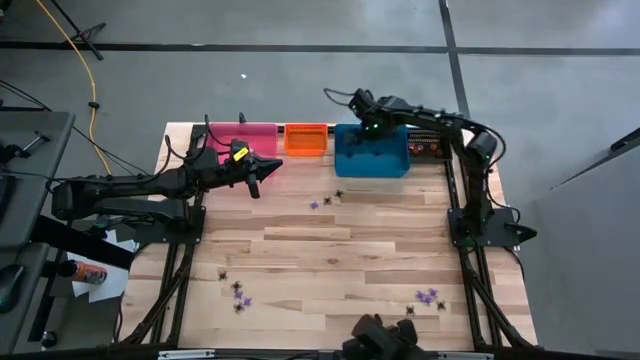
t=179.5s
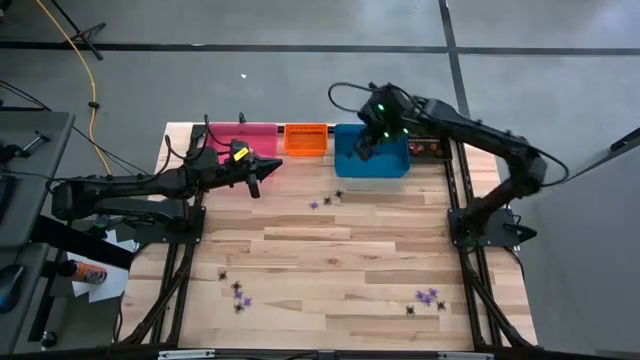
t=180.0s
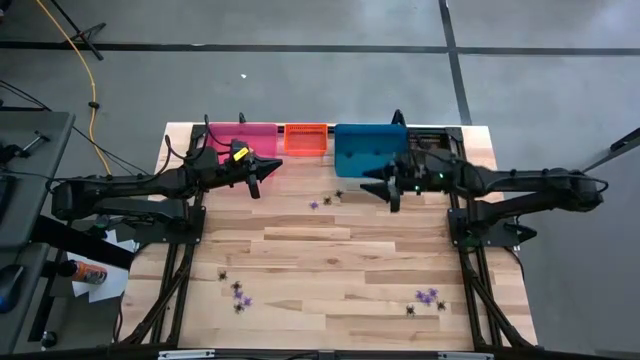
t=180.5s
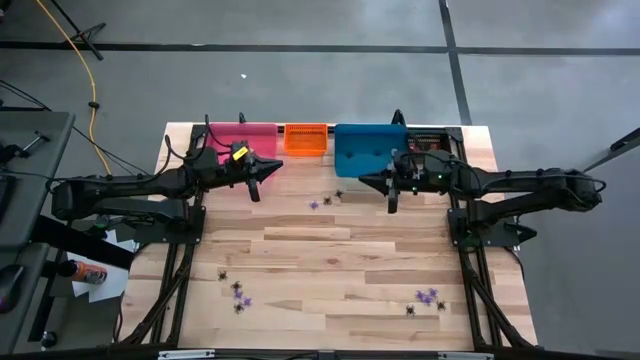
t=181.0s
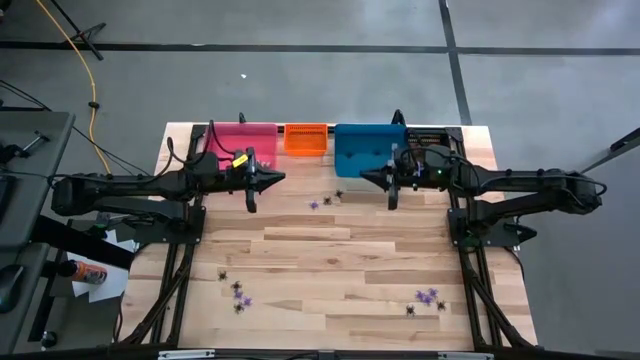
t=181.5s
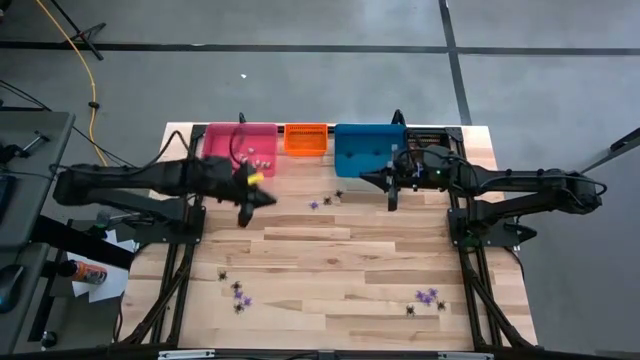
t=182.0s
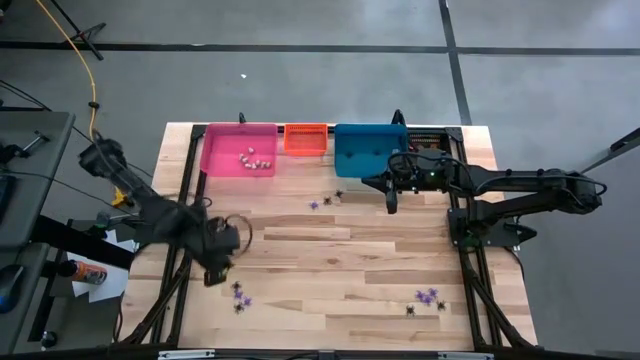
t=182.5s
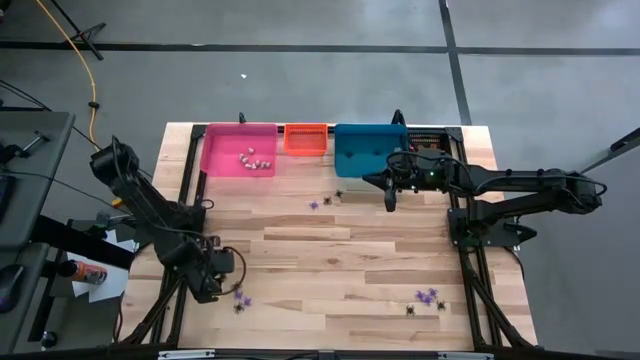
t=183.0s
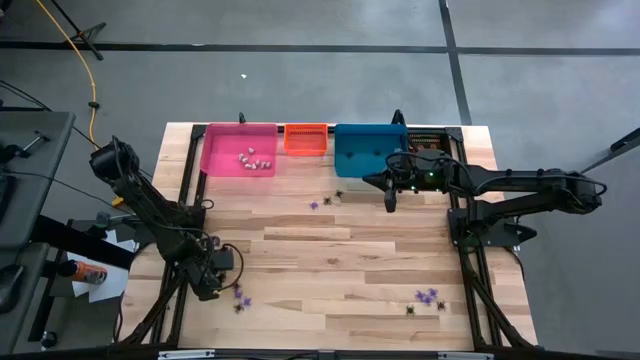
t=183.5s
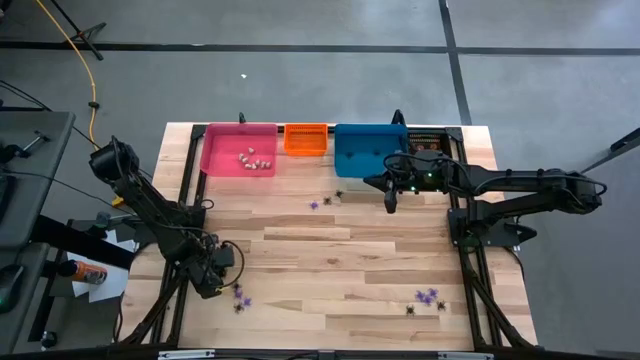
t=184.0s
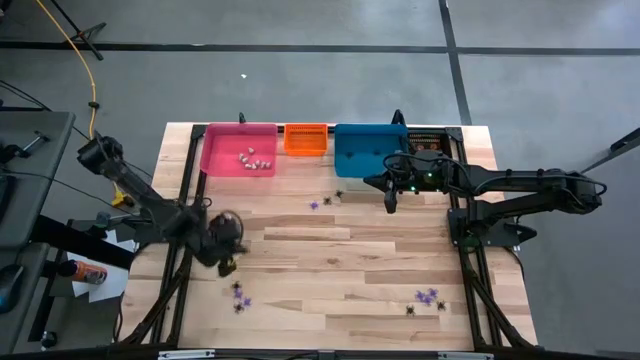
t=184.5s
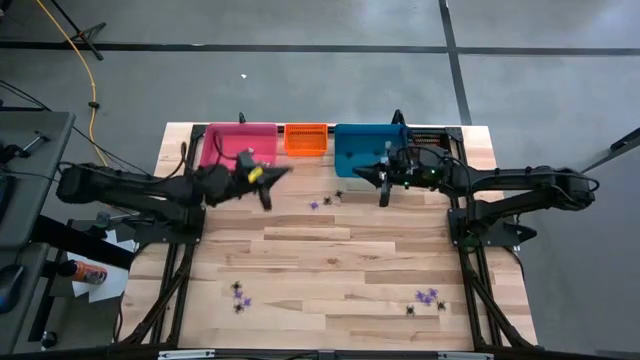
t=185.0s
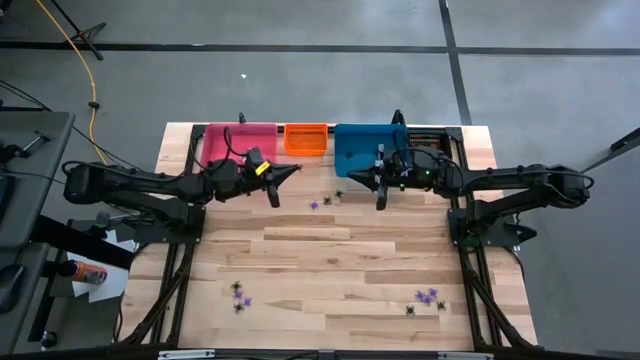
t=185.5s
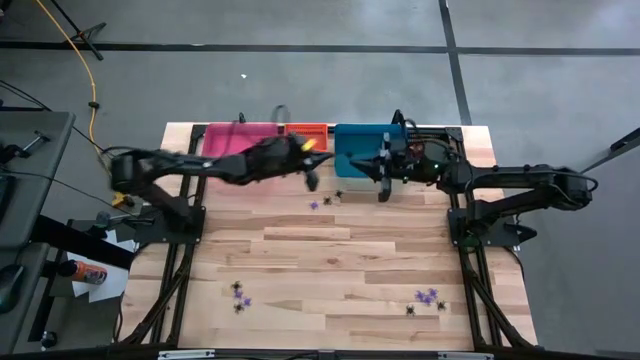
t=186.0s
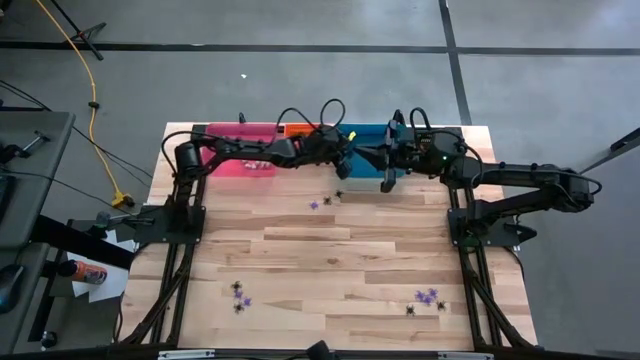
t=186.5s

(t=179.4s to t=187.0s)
Task: Sort Halloween decoration
Put the black spider toy into the blue bin

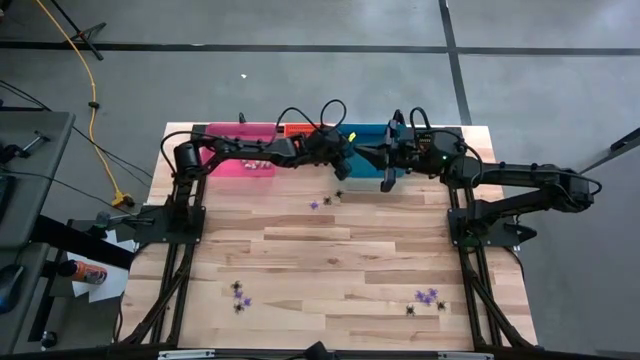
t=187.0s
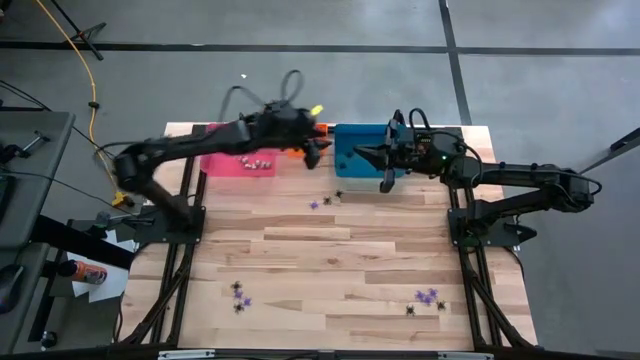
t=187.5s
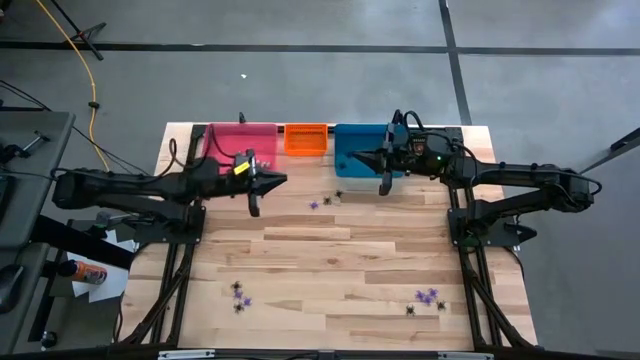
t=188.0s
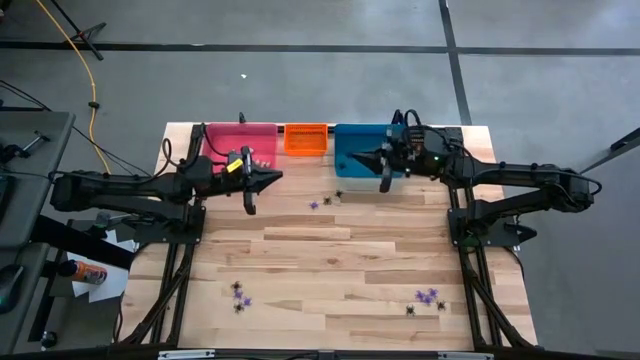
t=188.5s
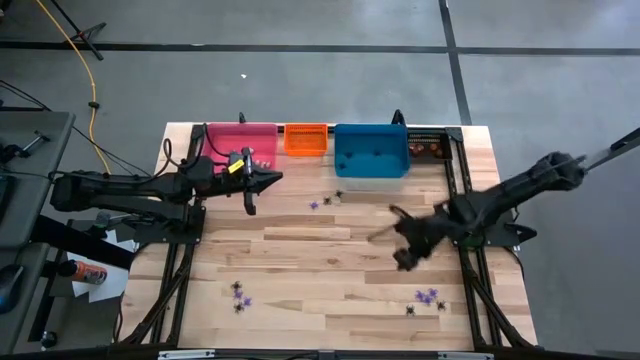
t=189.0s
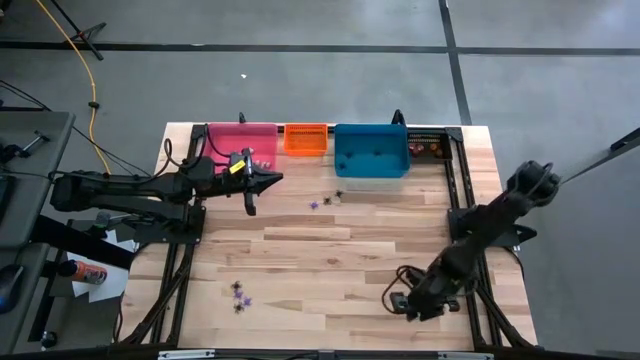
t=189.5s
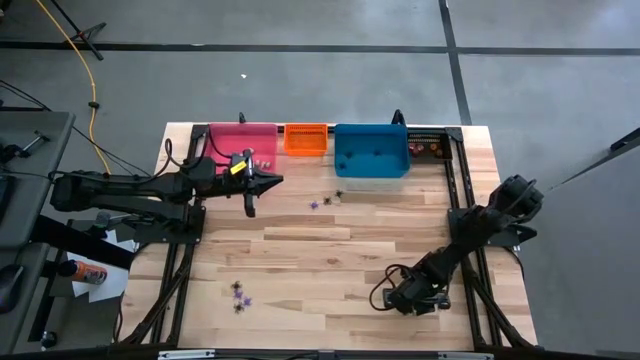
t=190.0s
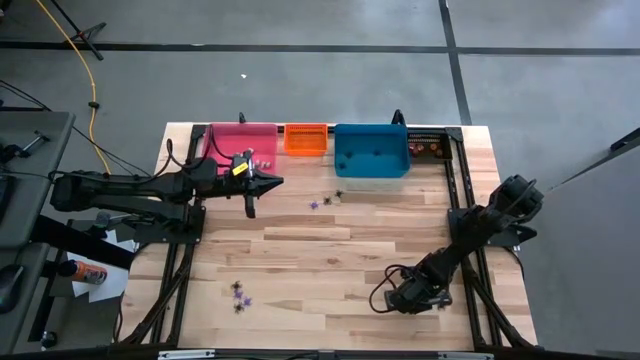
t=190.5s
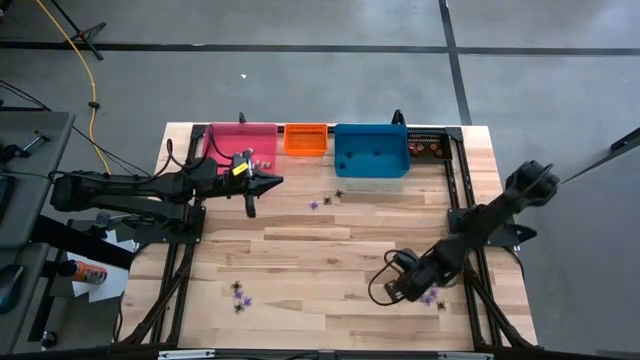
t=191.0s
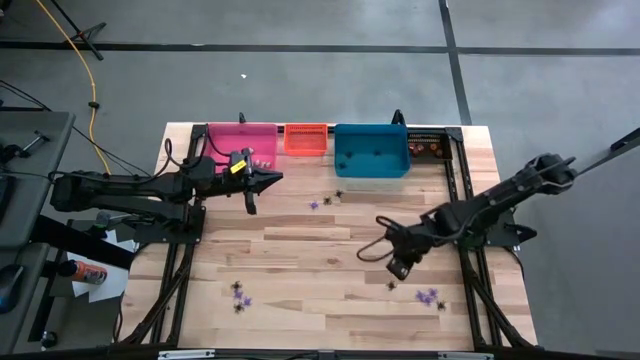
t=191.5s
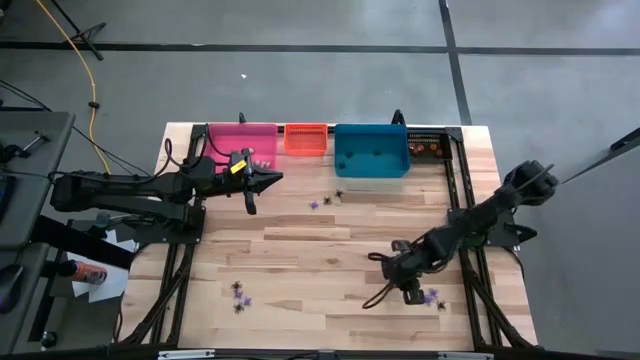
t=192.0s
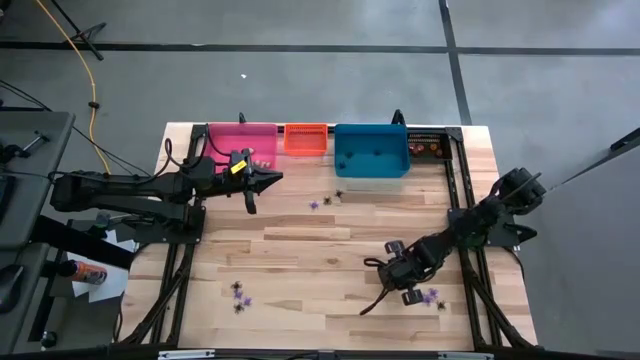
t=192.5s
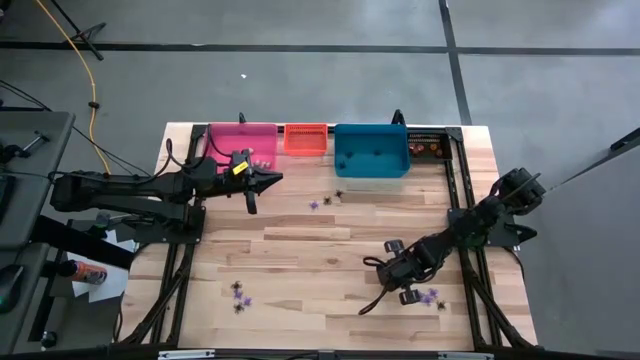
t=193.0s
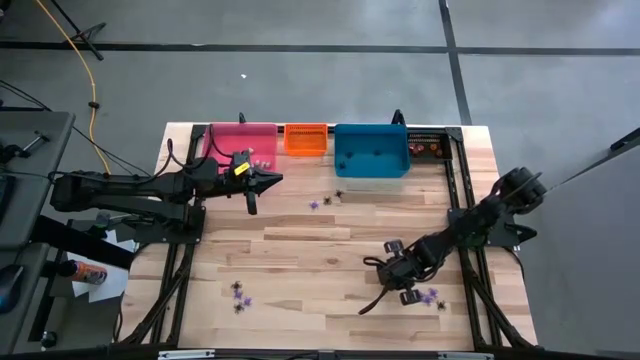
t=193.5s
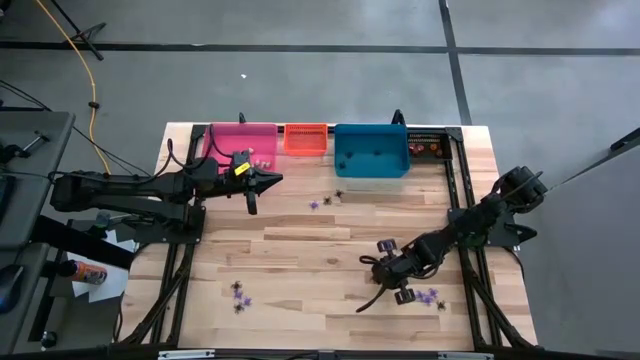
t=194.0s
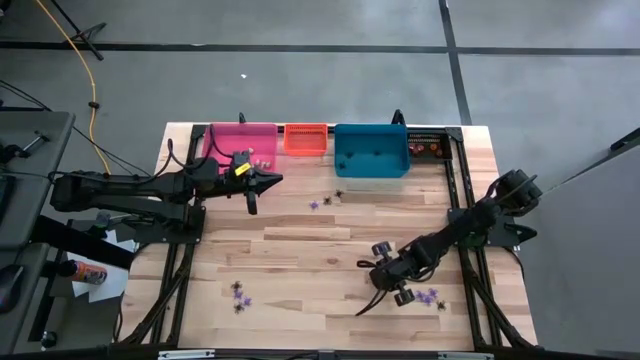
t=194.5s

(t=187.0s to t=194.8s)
Put the black spider toy into the blue bin

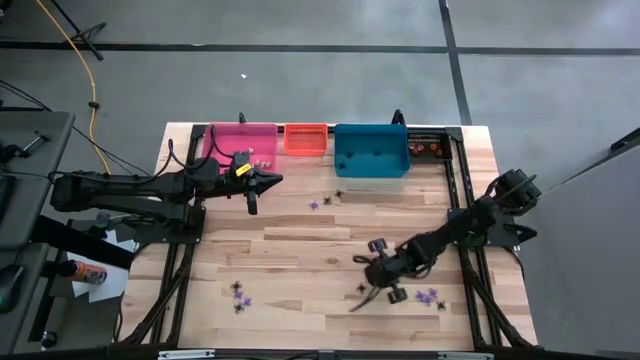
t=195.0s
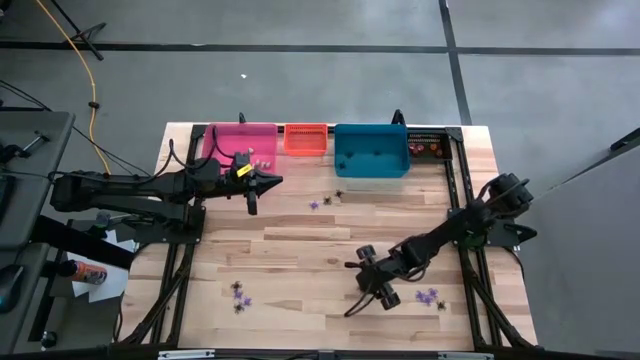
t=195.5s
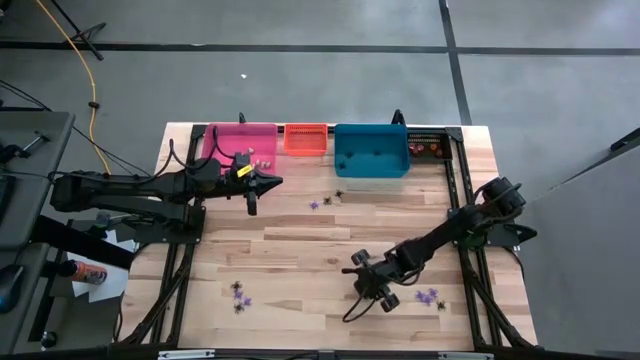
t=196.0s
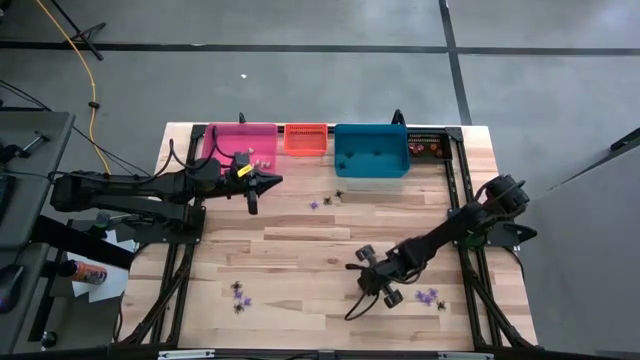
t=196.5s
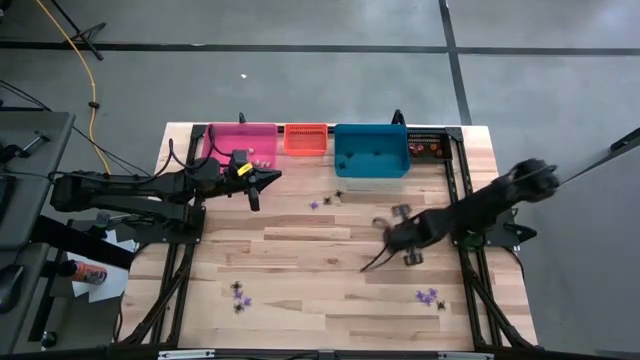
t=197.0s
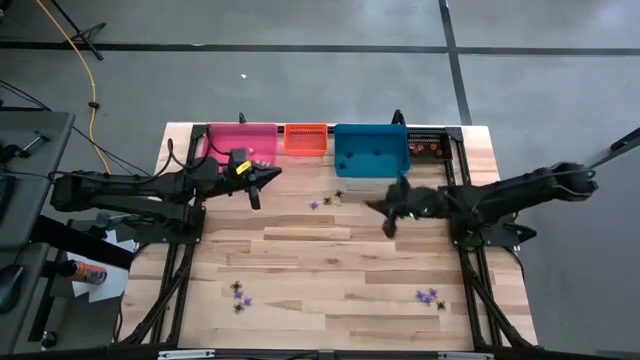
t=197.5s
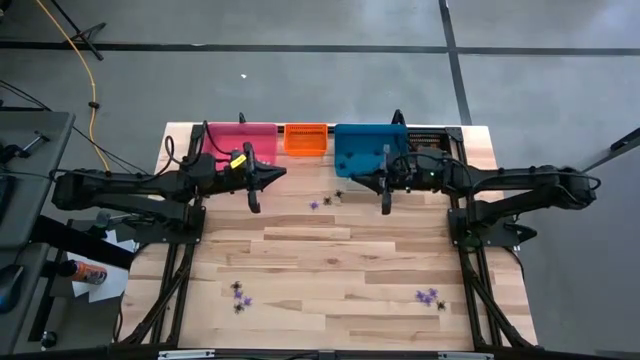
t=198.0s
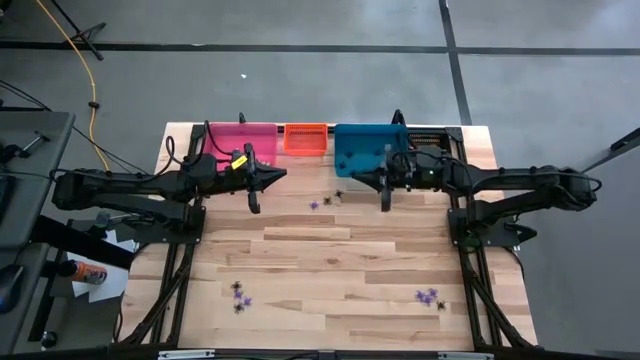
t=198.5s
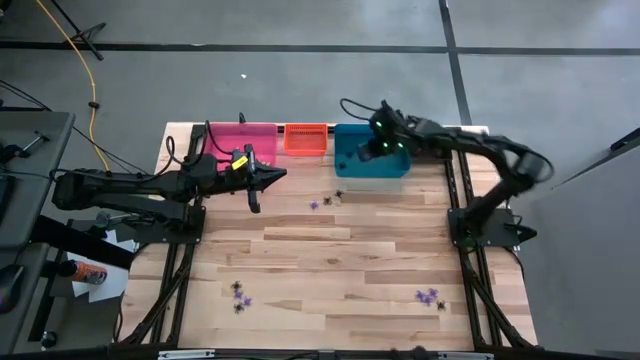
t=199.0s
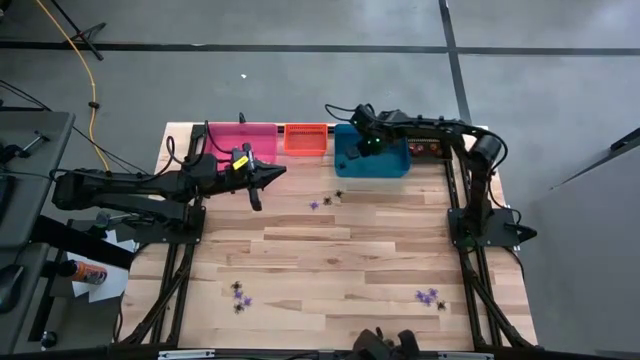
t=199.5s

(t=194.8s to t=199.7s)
Put the black spider toy into the blue bin

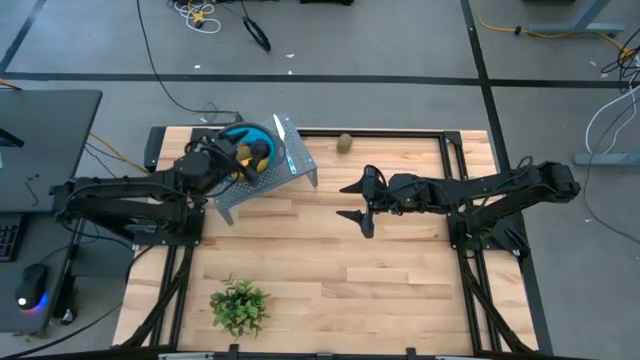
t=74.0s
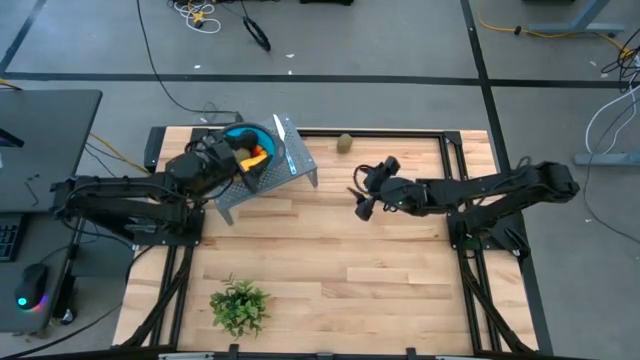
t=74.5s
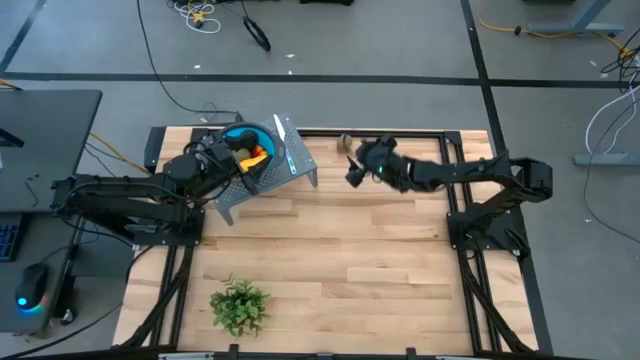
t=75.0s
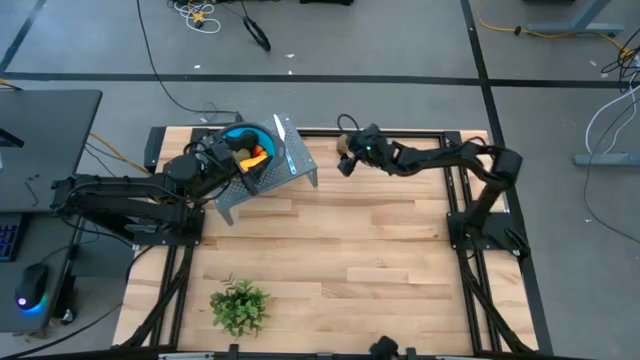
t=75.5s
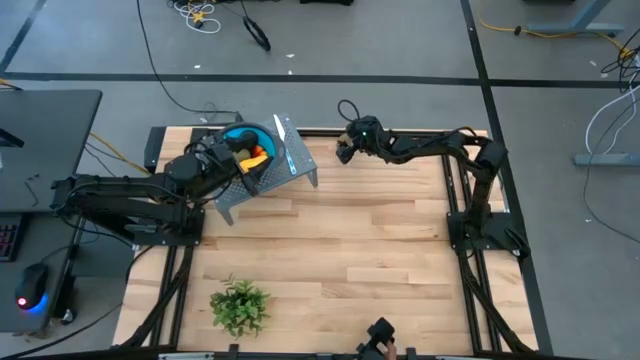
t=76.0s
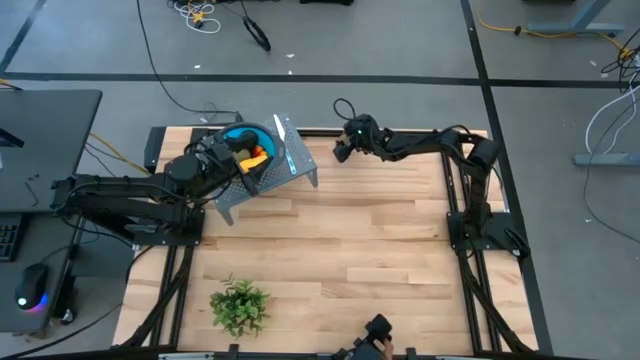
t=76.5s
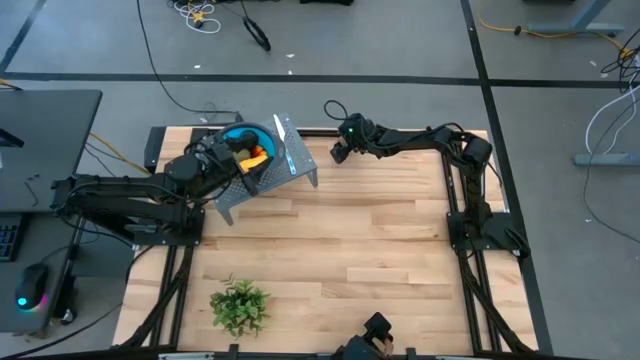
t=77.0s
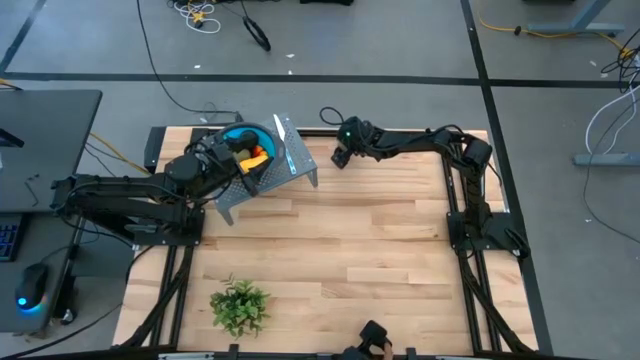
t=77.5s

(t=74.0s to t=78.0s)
Task: Pick & Place Fruit
Put the brown kiwi into the blue strainer bowl on the shelf
